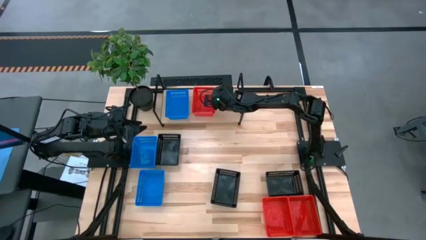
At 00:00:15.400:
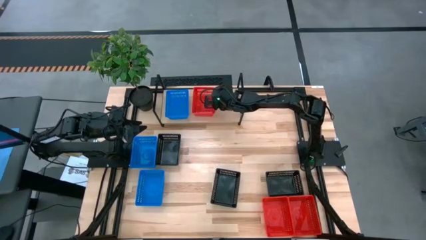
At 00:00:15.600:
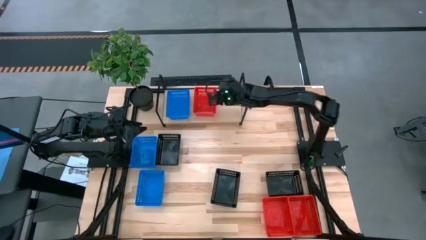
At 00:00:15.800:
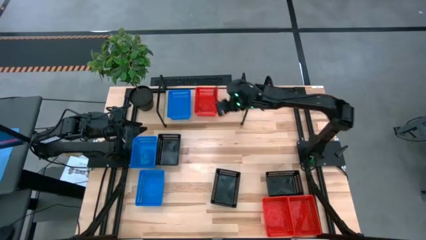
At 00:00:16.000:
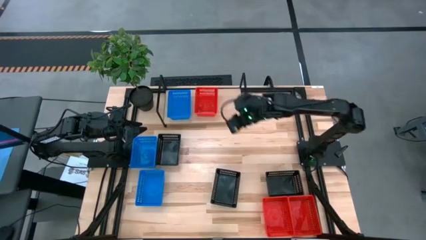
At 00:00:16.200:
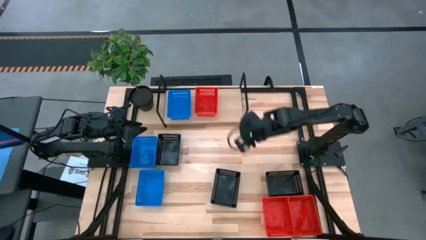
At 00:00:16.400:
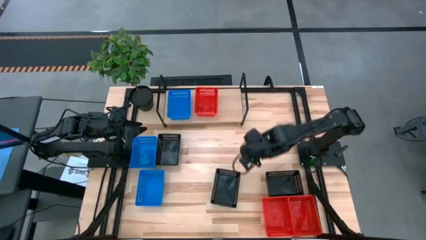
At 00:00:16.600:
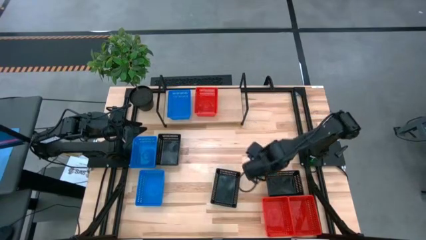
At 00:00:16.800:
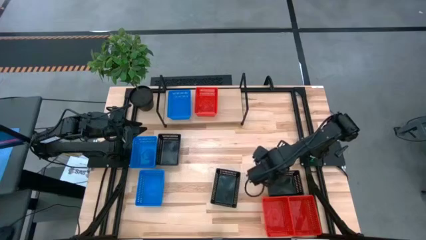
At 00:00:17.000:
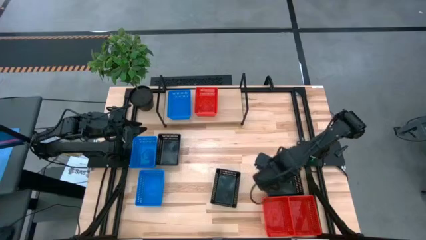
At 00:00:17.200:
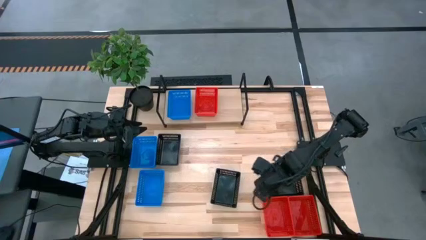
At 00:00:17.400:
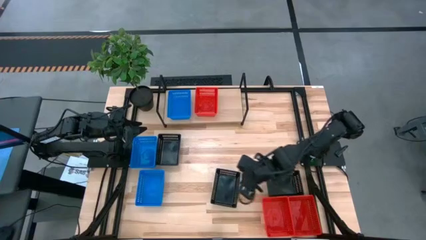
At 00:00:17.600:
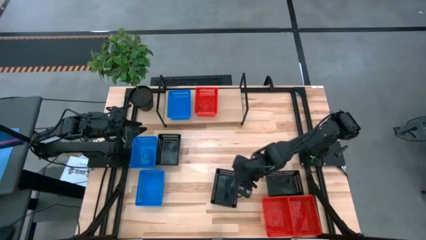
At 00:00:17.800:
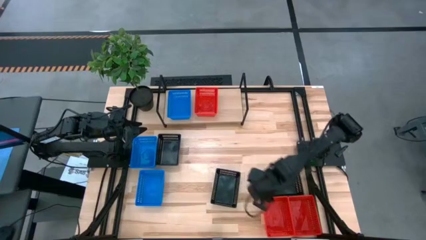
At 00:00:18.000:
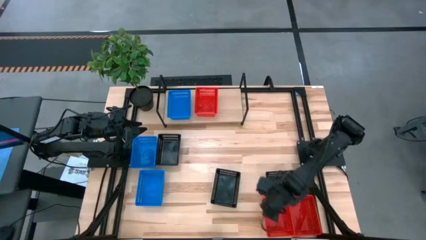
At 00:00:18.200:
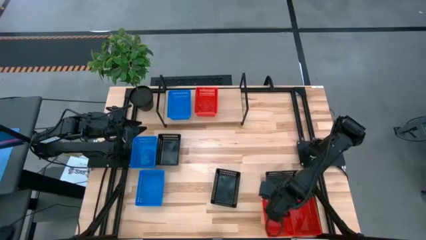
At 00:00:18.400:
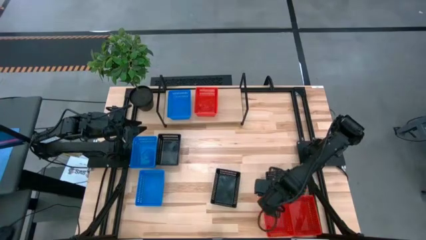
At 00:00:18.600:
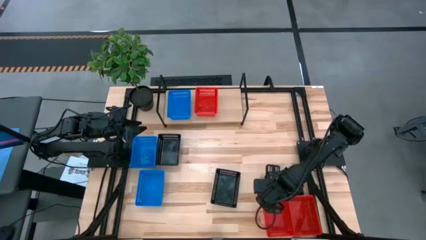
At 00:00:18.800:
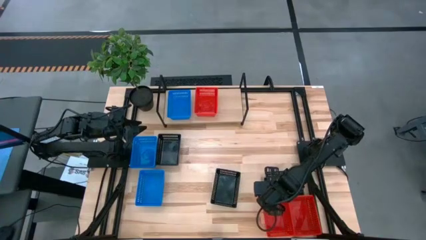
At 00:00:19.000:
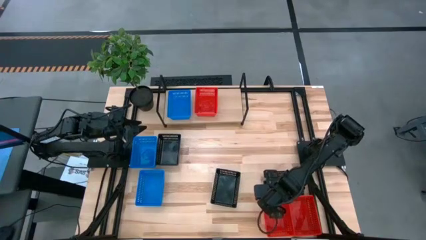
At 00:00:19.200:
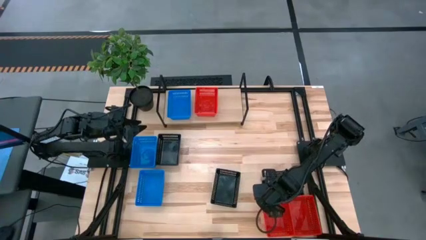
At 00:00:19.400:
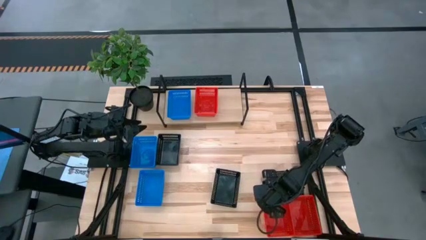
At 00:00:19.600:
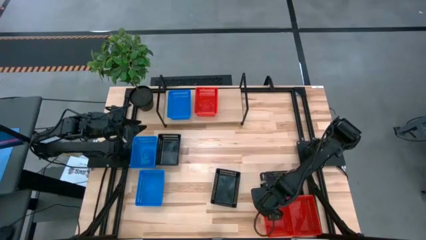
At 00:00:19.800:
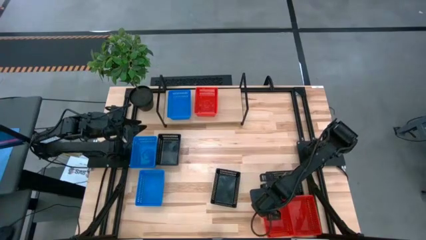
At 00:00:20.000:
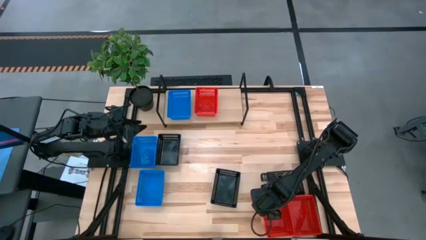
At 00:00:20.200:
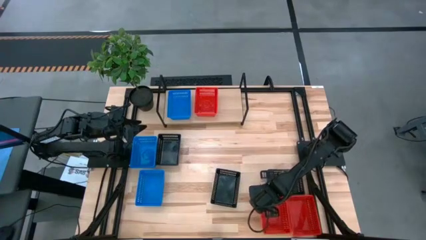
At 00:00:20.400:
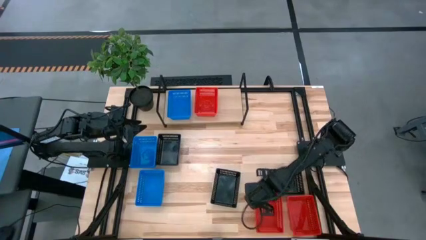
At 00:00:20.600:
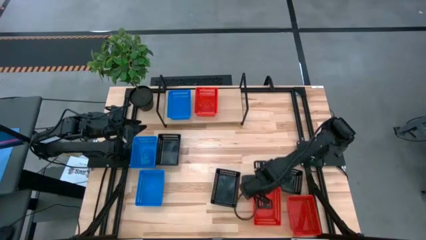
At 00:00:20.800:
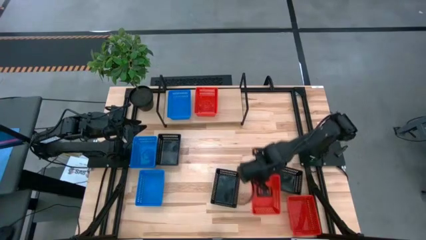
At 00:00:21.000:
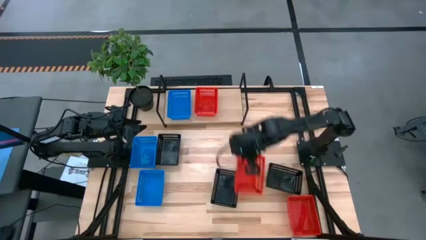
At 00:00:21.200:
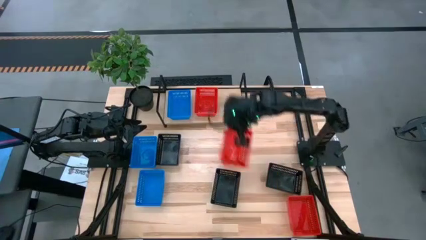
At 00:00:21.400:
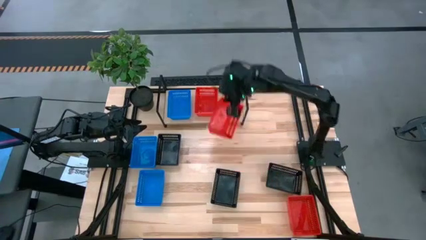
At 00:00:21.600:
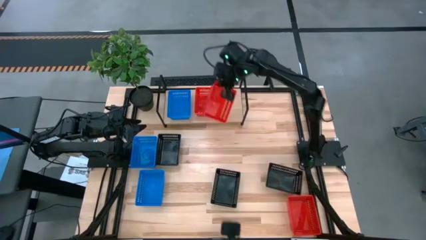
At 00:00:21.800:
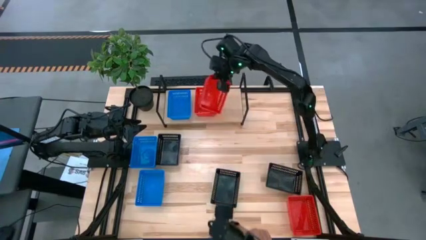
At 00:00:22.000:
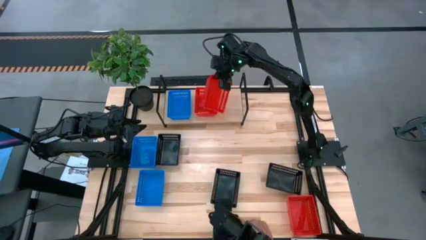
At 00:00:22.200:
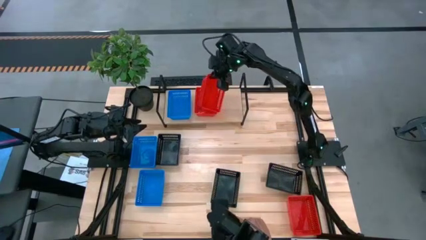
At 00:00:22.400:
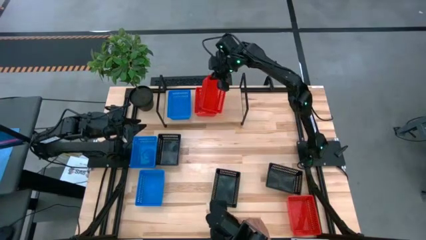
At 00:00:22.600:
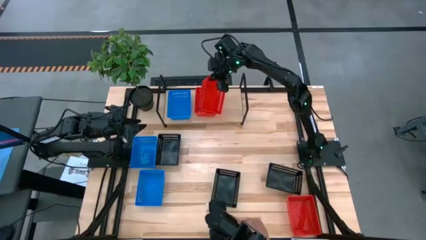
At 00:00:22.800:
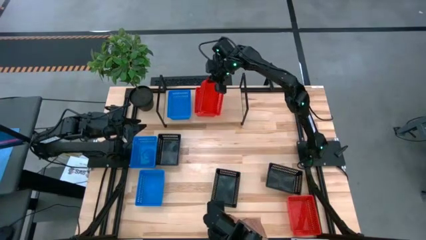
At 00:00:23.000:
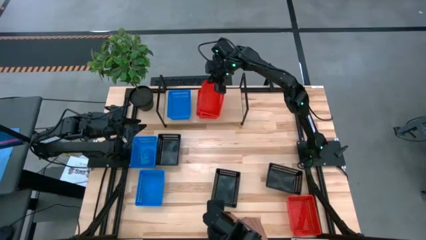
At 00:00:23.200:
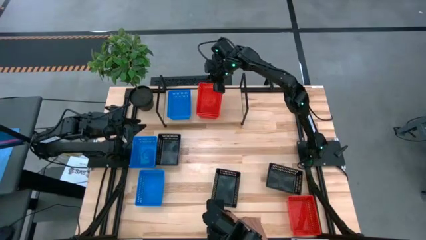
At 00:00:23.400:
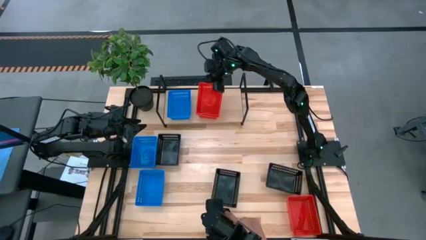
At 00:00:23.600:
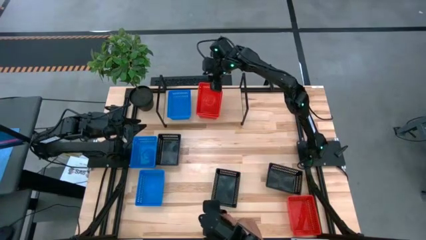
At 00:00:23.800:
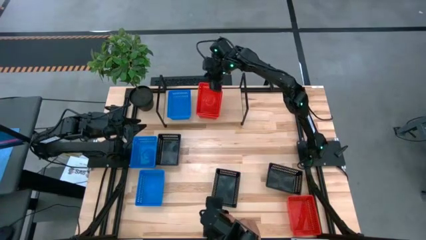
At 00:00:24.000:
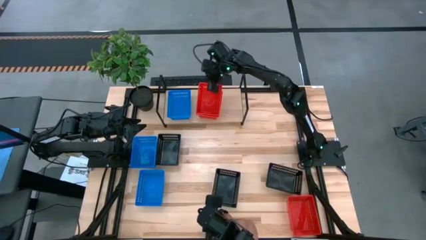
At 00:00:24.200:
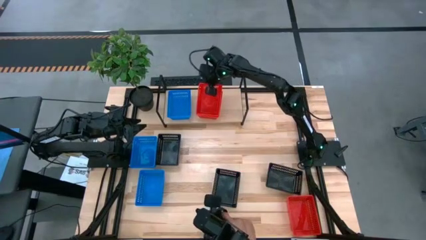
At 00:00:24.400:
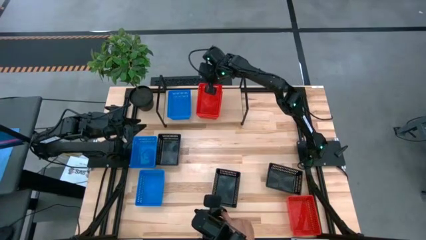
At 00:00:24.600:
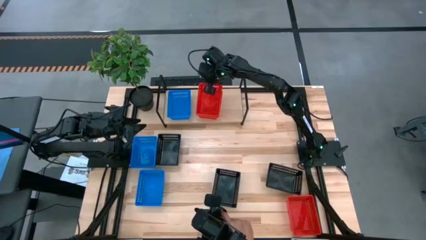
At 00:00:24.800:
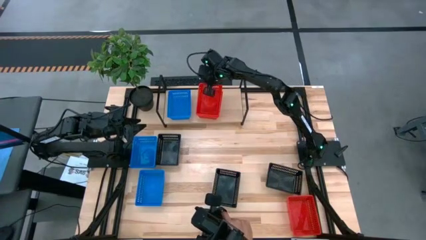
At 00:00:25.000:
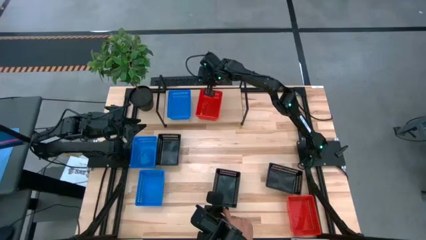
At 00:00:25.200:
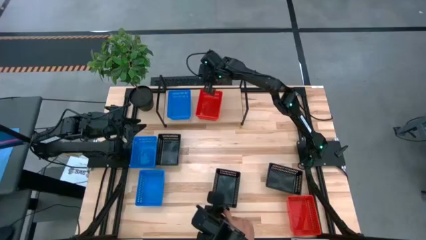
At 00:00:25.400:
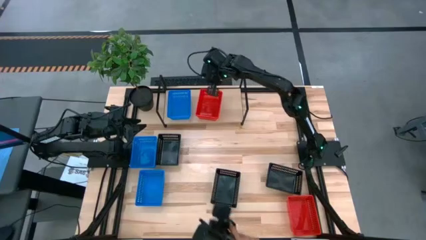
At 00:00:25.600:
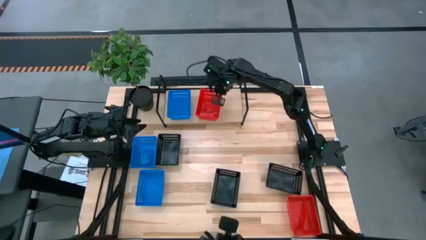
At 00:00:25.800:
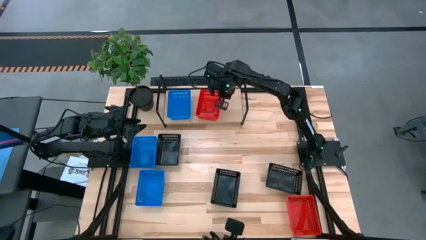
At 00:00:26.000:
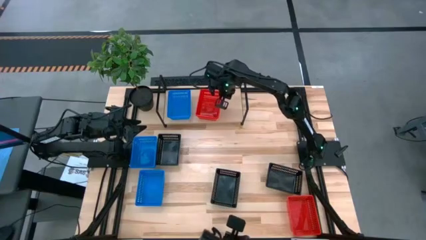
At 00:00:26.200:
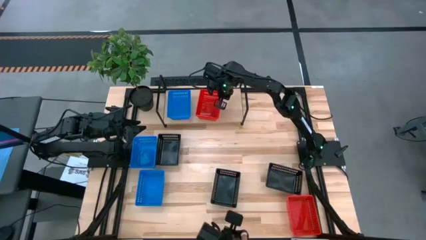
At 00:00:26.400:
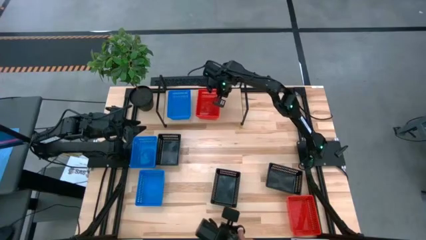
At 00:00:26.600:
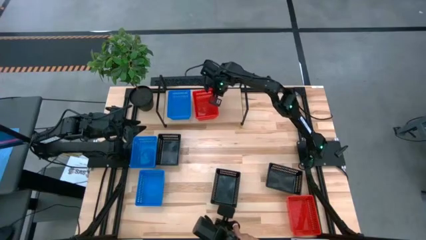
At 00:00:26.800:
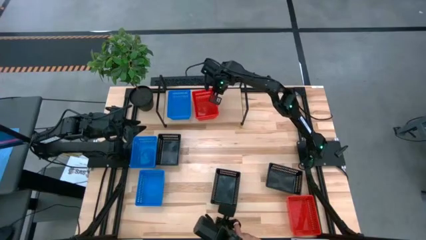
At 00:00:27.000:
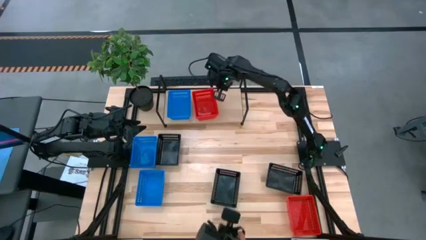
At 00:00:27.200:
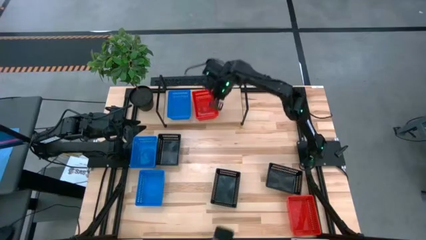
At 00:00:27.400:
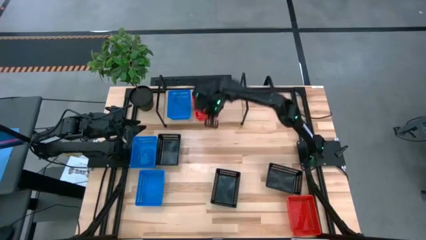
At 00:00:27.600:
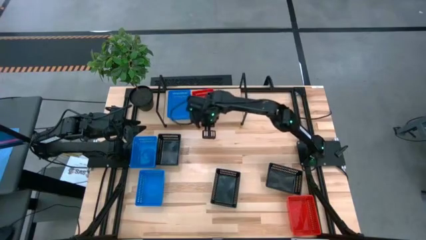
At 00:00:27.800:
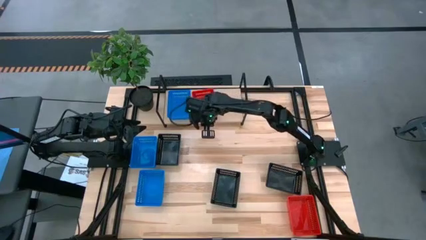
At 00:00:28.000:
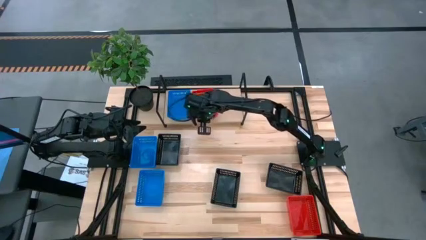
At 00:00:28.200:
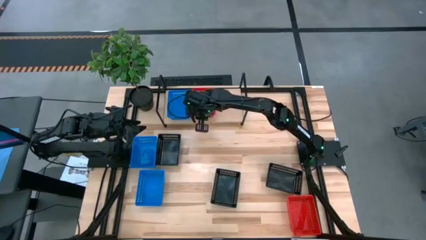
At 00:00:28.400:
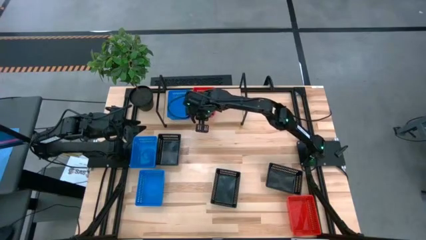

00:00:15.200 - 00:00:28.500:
Task: Stack baskets on shelf by color
Stack the left red bin on the red bin on the shelf

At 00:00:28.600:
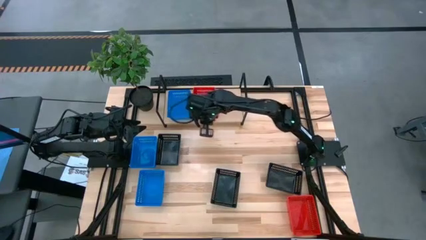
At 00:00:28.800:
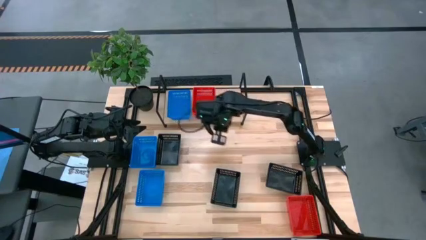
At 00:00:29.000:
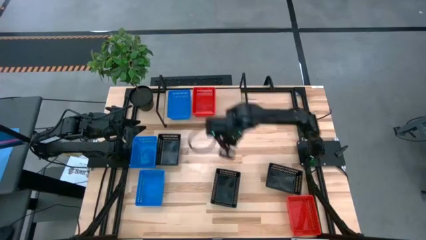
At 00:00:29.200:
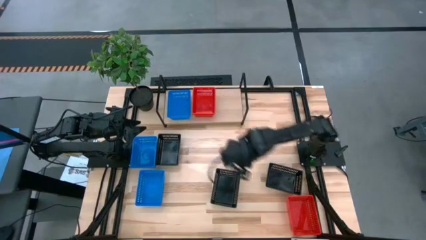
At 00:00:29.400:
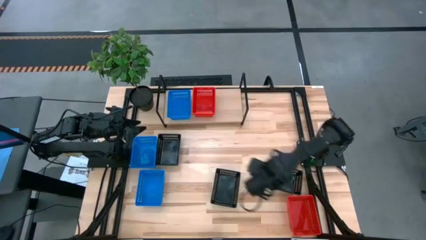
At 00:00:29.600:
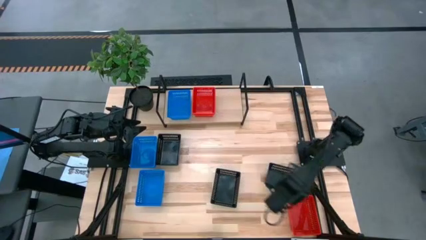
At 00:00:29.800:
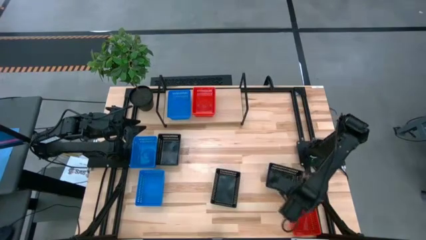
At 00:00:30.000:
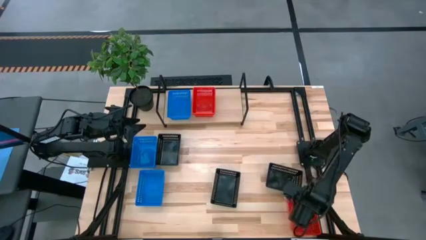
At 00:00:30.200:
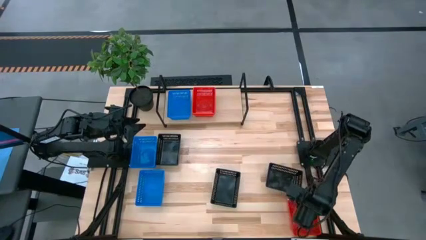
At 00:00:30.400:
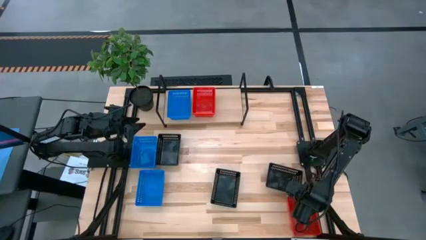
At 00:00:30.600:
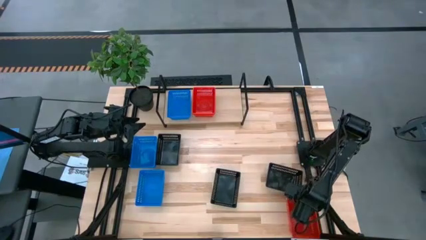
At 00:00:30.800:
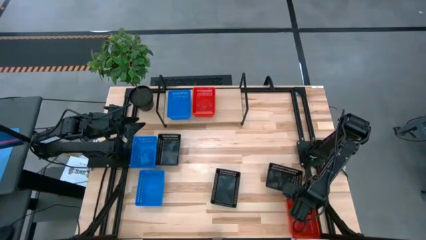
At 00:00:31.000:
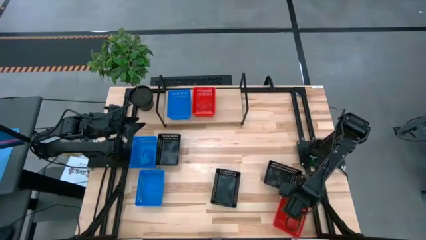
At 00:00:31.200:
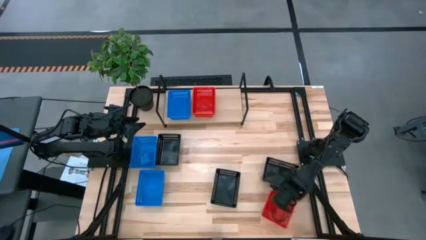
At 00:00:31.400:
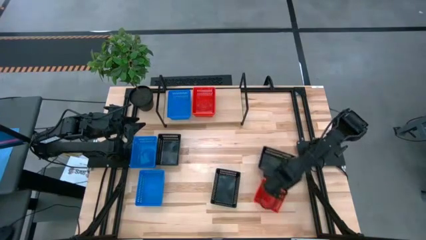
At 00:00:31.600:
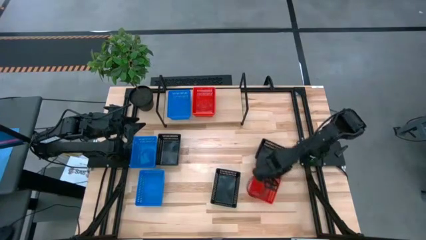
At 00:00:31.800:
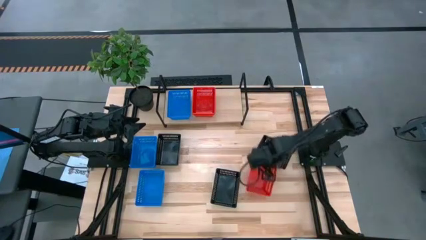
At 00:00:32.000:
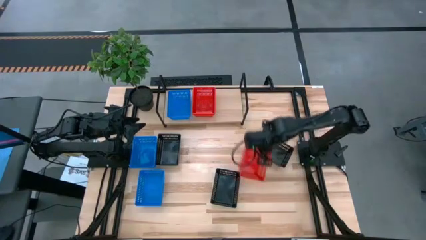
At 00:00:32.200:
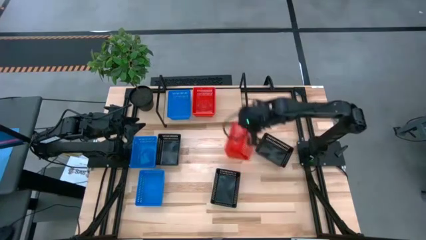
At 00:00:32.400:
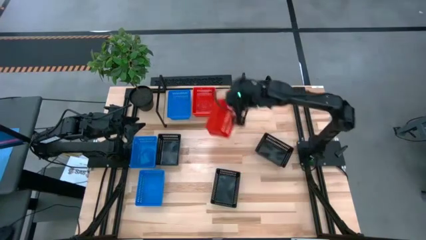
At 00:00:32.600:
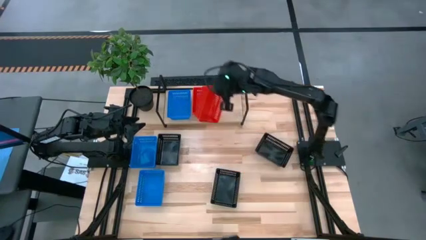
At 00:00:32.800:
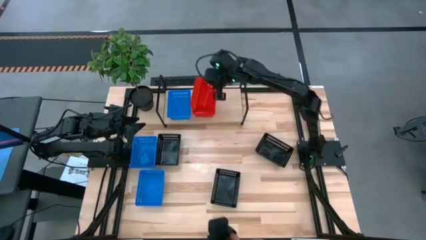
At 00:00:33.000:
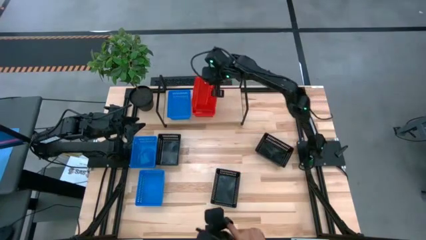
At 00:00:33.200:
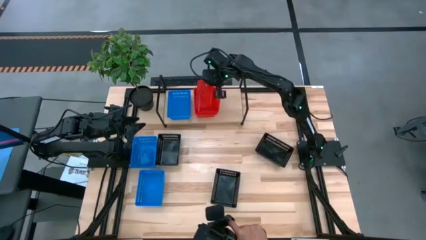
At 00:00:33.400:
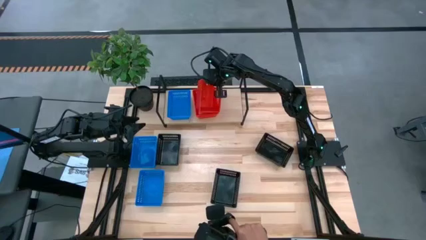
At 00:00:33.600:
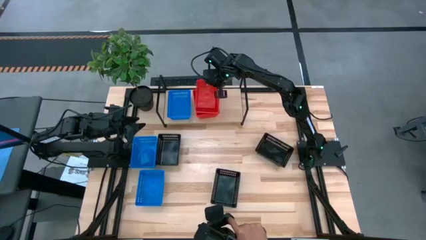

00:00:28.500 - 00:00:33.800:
Stack the red bin on the red bin on the shelf
